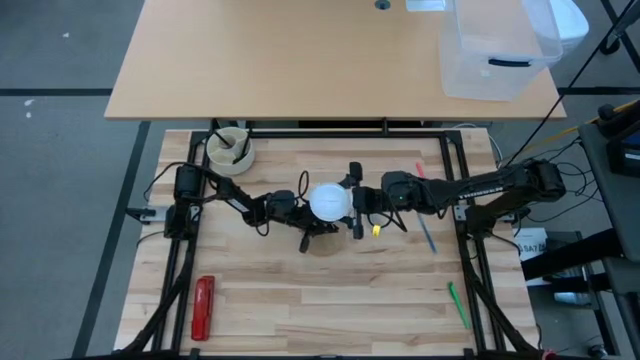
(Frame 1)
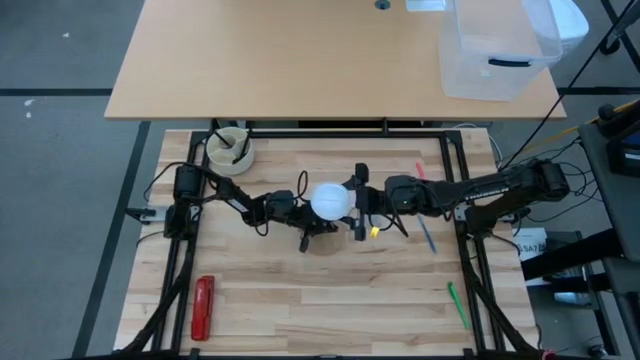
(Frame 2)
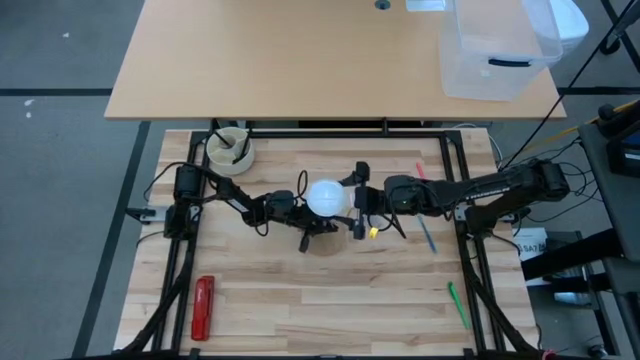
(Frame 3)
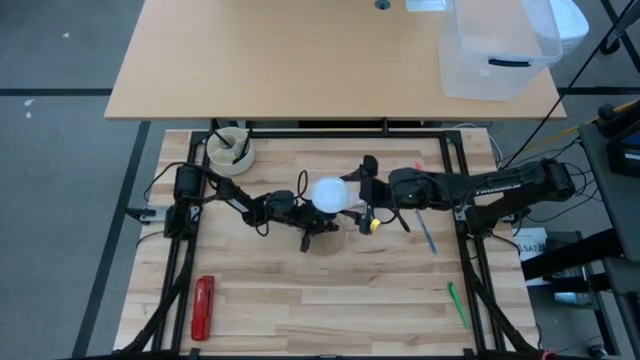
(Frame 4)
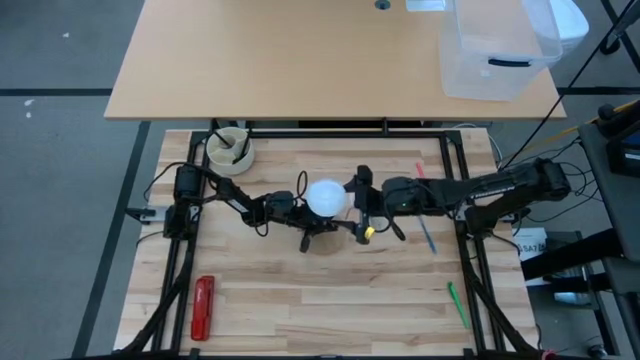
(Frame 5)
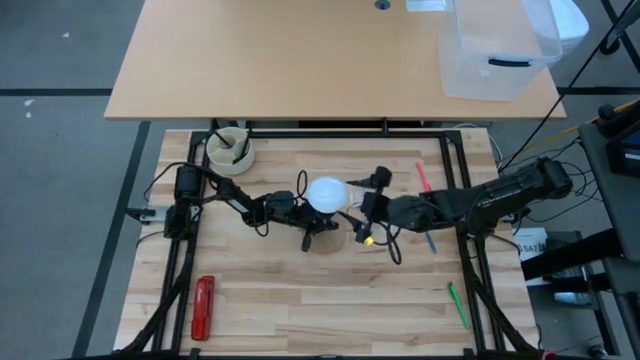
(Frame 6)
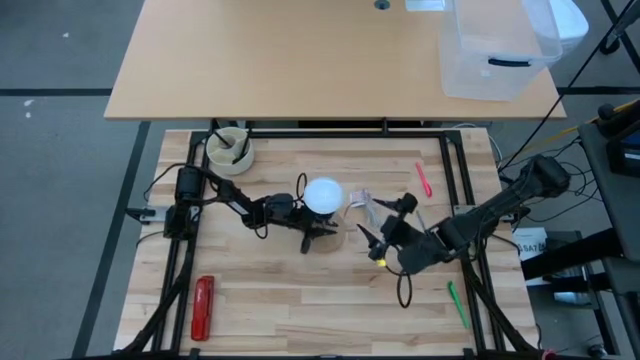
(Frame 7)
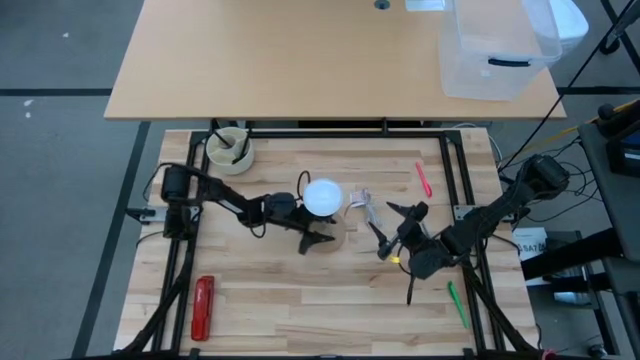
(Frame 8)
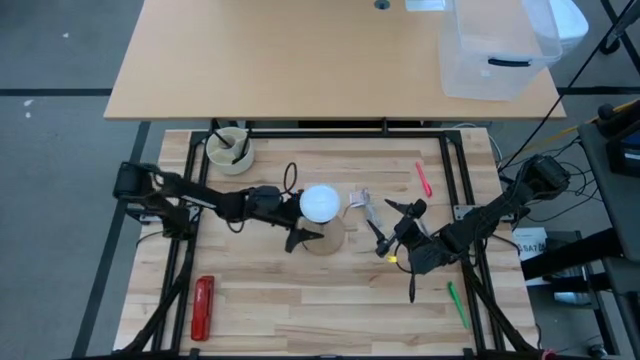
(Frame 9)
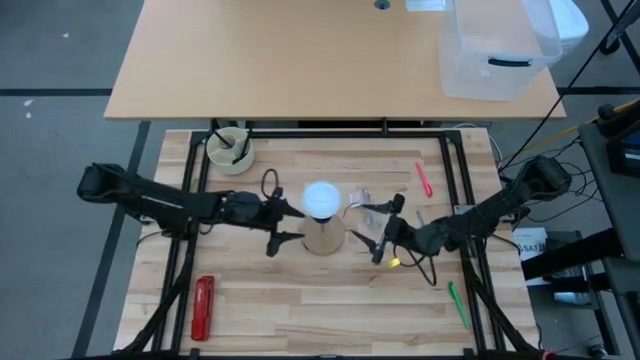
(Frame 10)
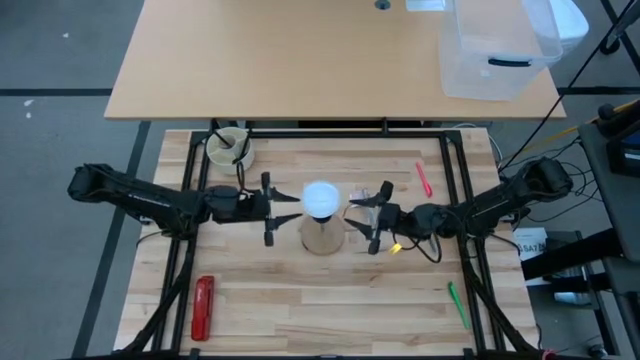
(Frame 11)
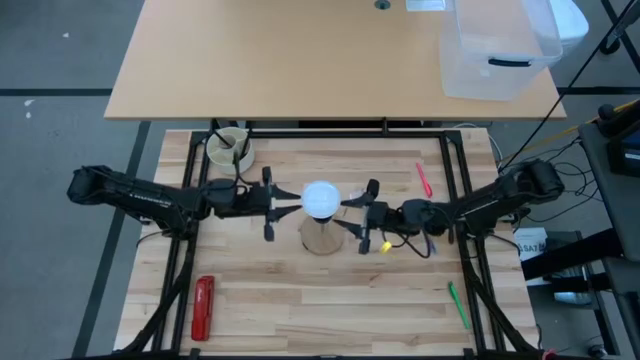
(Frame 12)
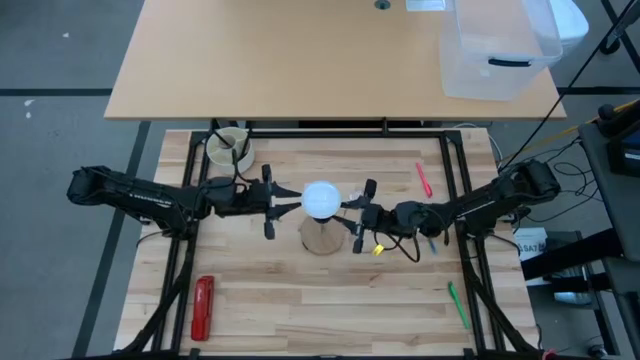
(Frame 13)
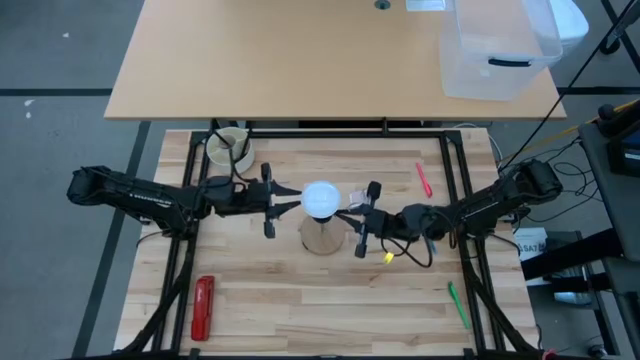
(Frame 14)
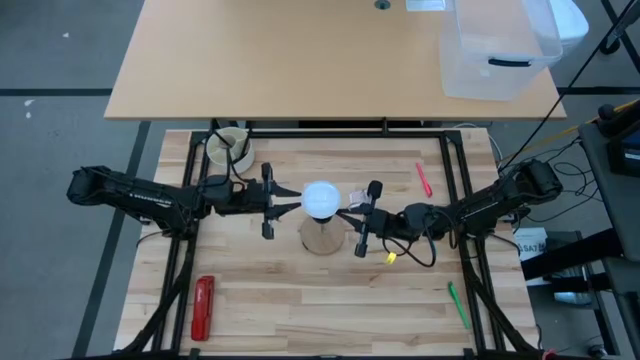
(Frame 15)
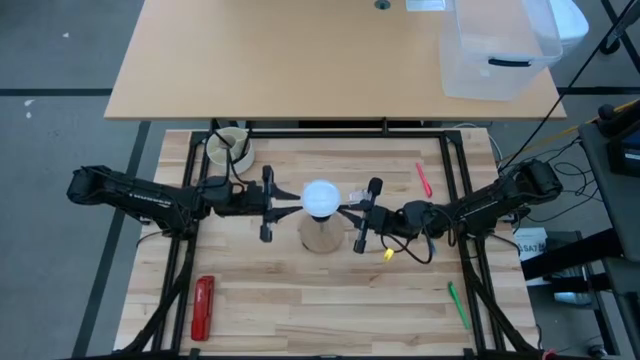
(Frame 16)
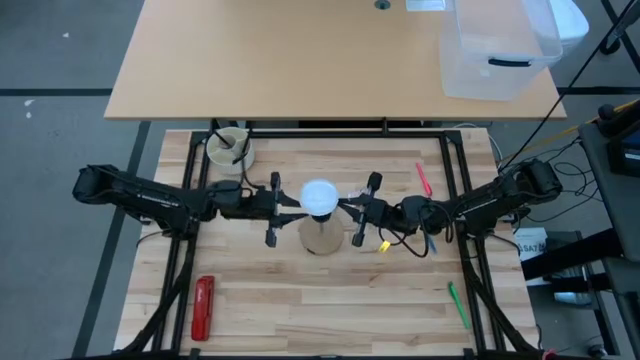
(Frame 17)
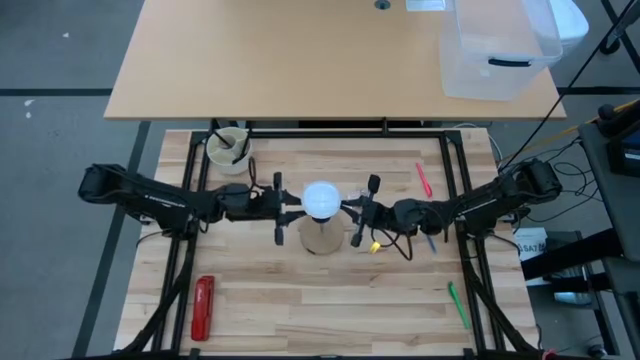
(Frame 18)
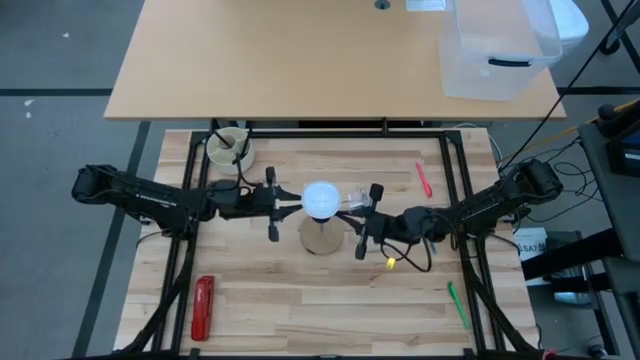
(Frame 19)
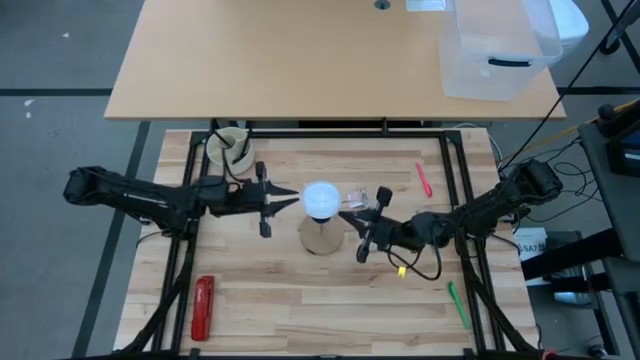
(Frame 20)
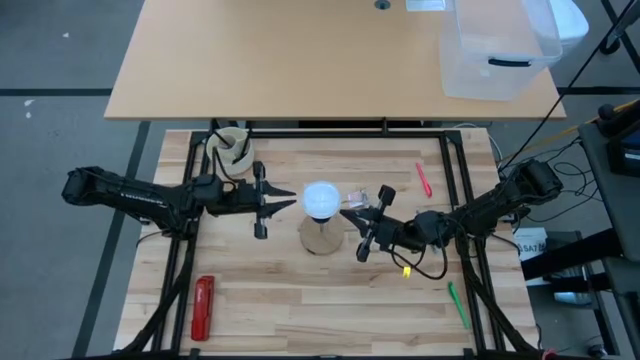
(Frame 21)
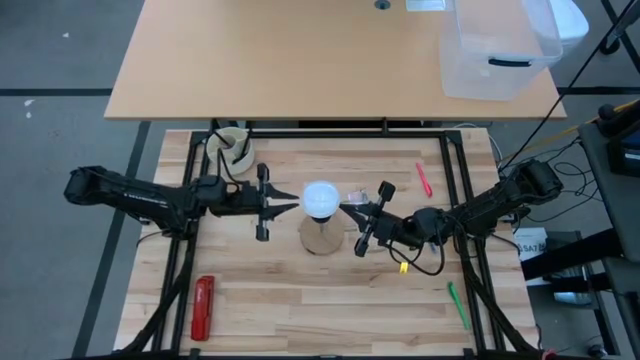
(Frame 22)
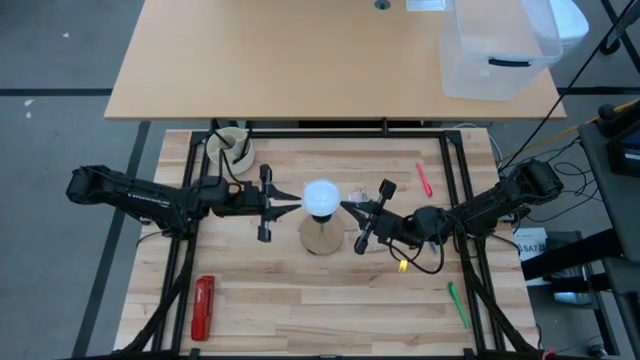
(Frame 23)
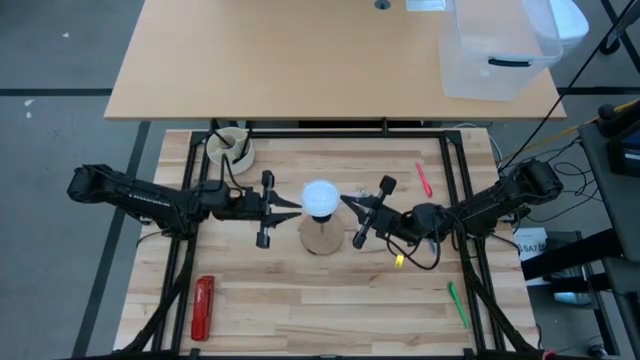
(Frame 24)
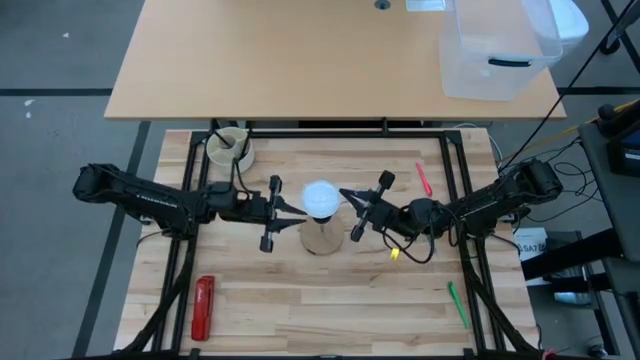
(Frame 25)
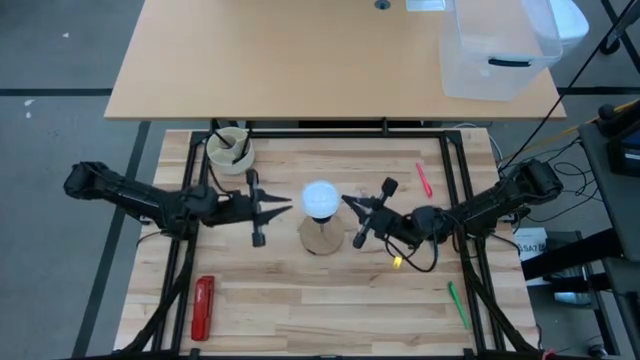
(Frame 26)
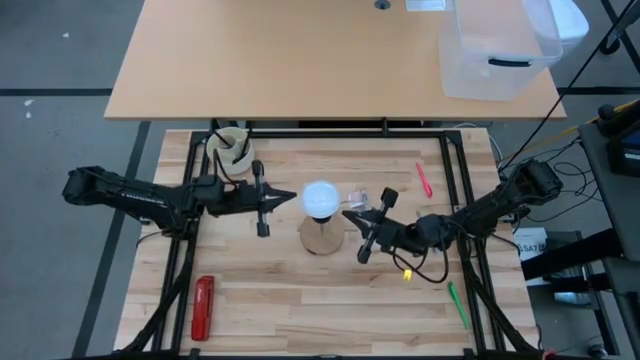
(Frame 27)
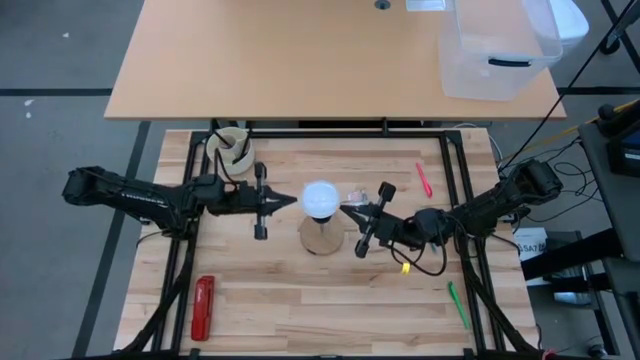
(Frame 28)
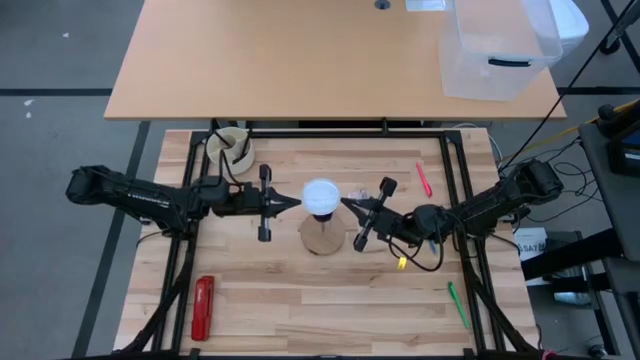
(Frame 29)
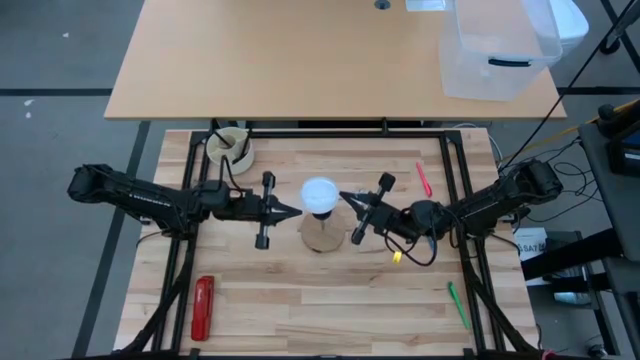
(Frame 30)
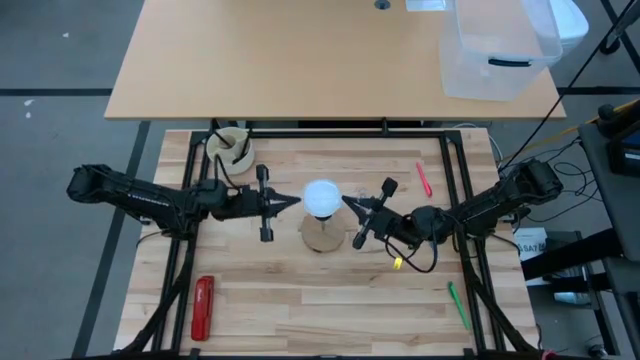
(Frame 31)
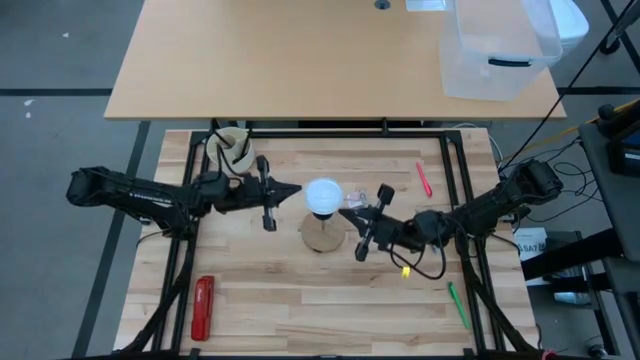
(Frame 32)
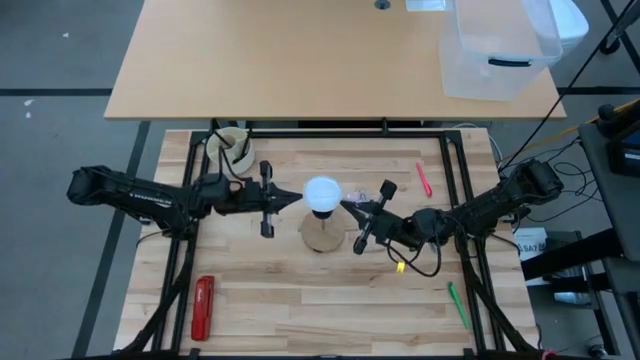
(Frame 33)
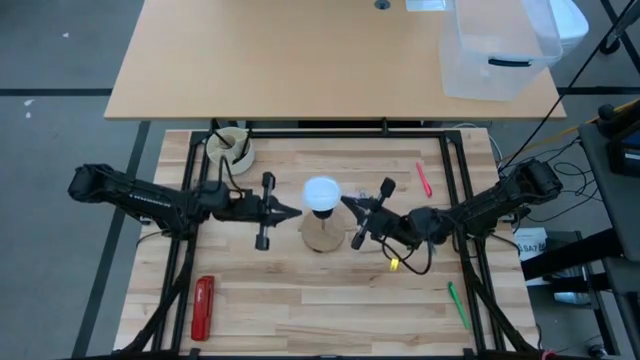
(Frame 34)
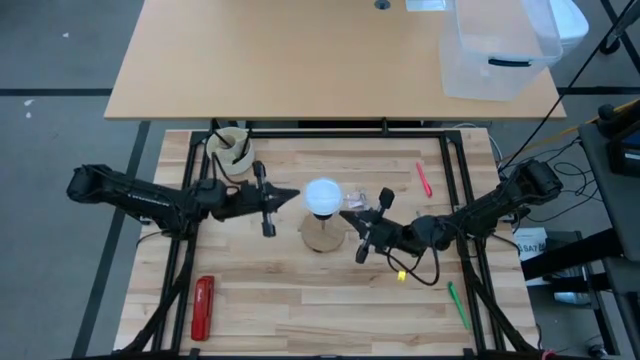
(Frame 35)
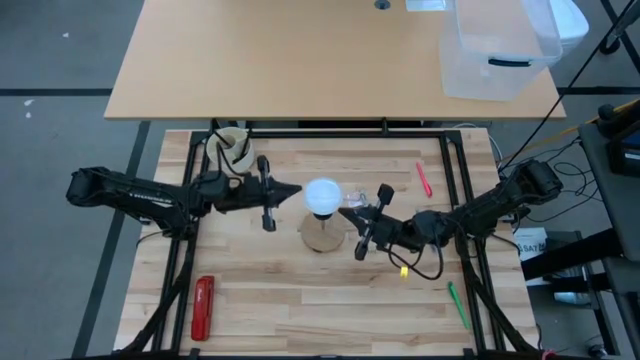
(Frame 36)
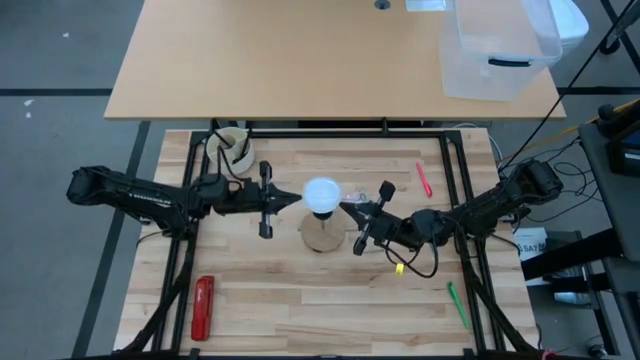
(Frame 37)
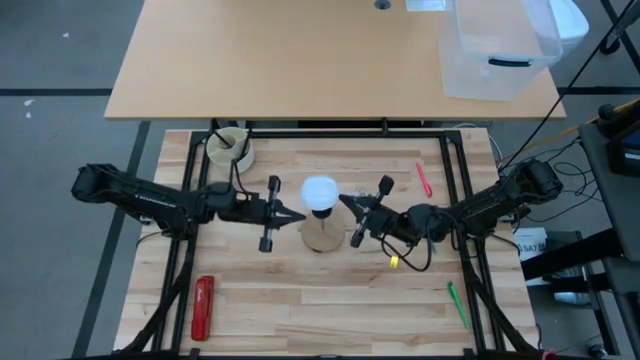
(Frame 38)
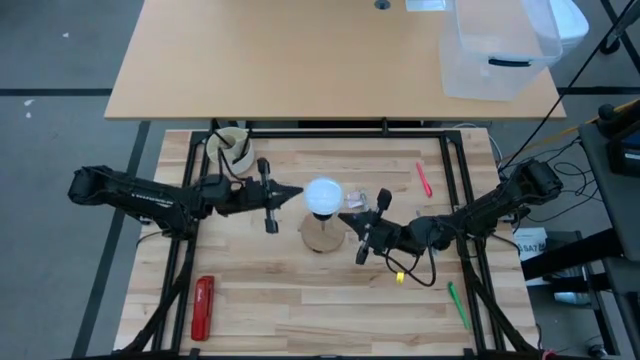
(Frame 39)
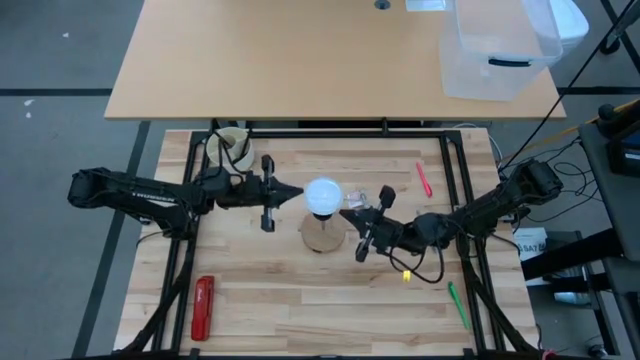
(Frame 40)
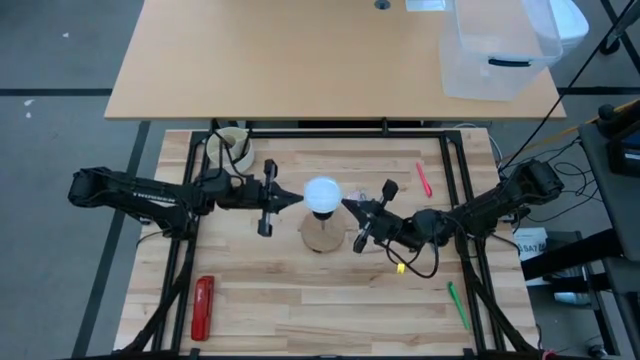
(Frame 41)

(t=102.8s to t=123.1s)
Task: Screw lightbulb
Remove the lightbulb from the desk lamp
